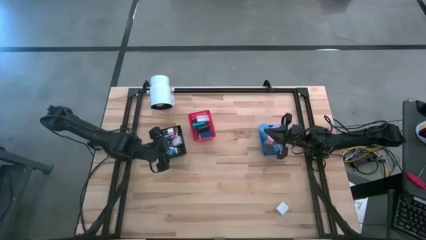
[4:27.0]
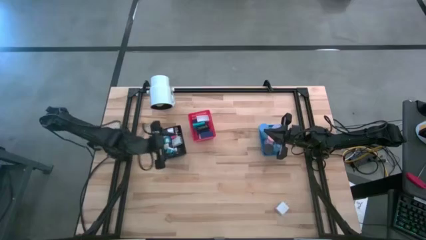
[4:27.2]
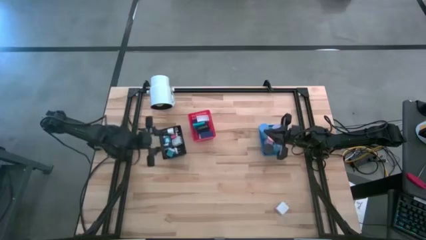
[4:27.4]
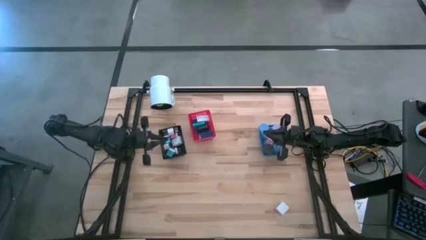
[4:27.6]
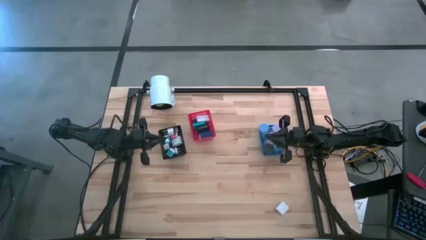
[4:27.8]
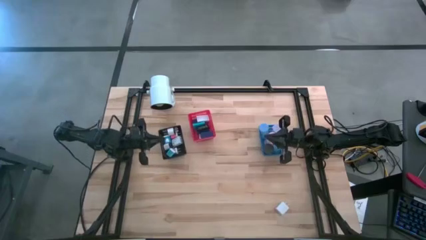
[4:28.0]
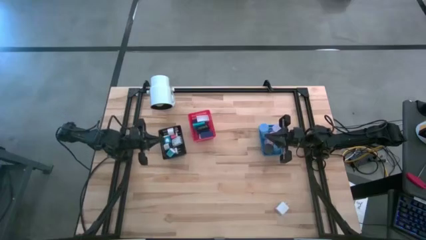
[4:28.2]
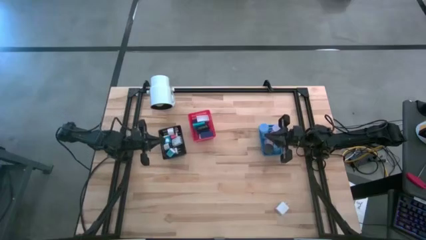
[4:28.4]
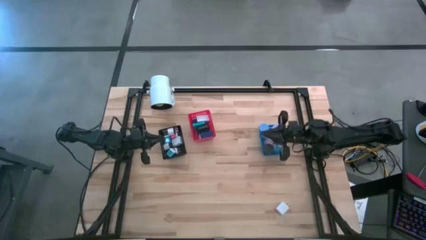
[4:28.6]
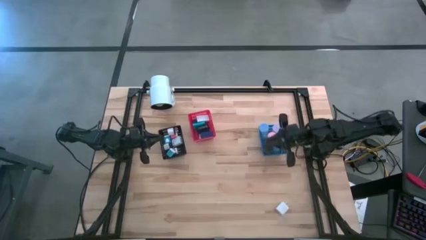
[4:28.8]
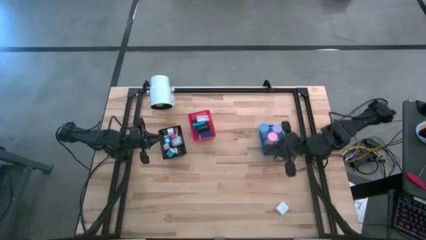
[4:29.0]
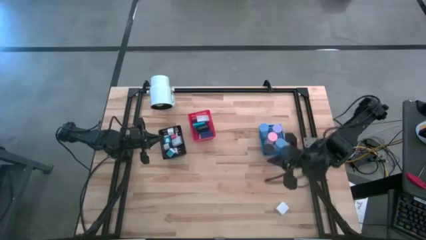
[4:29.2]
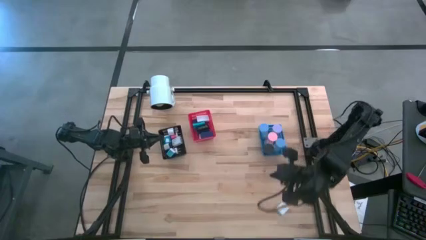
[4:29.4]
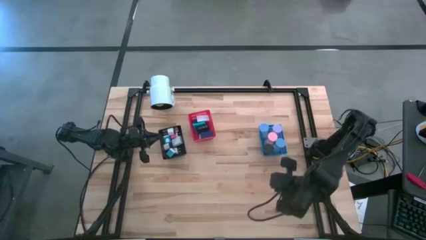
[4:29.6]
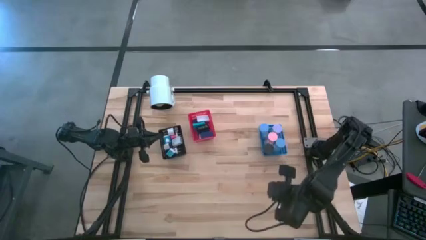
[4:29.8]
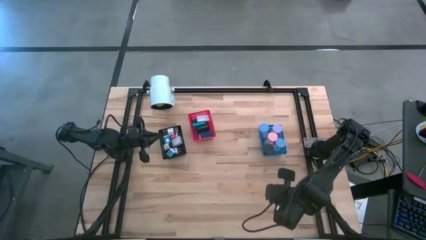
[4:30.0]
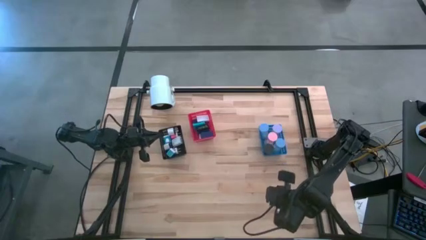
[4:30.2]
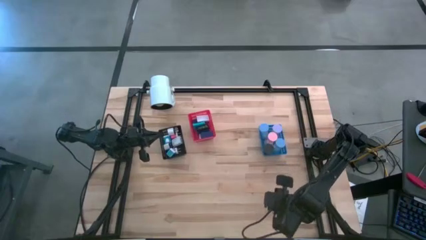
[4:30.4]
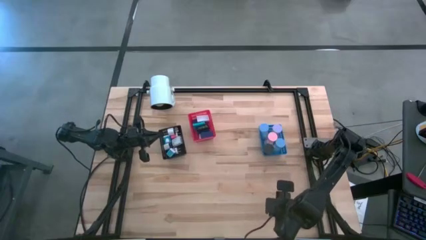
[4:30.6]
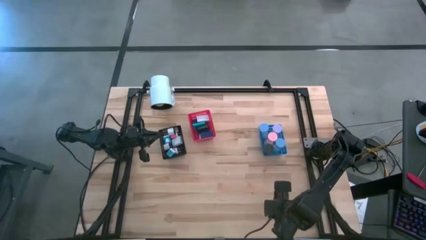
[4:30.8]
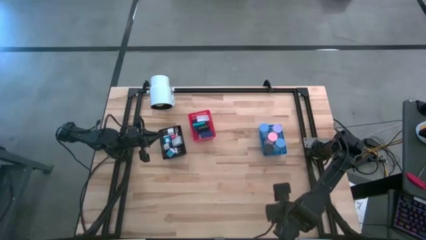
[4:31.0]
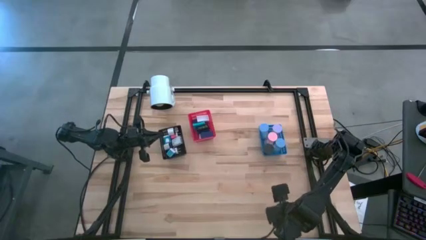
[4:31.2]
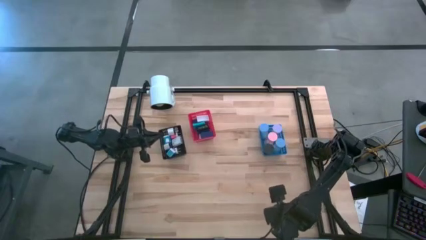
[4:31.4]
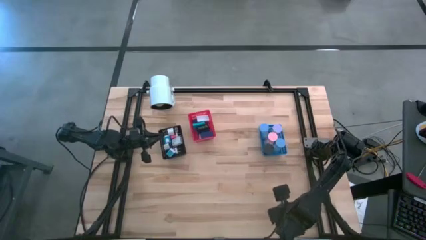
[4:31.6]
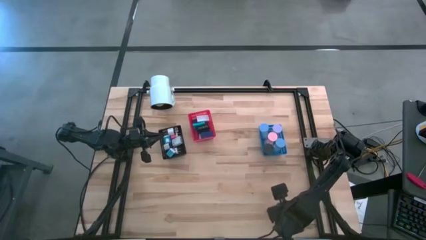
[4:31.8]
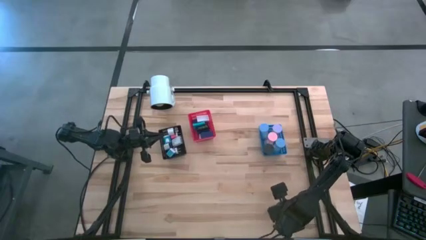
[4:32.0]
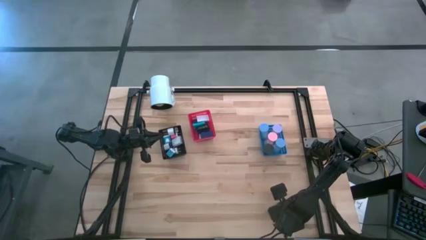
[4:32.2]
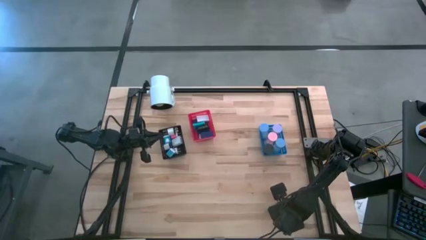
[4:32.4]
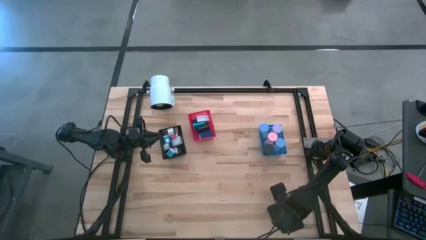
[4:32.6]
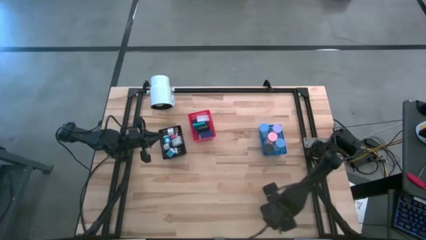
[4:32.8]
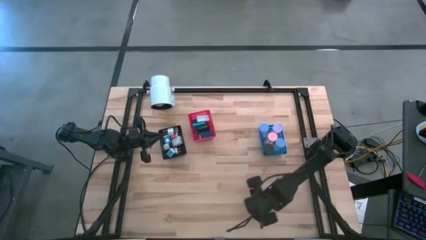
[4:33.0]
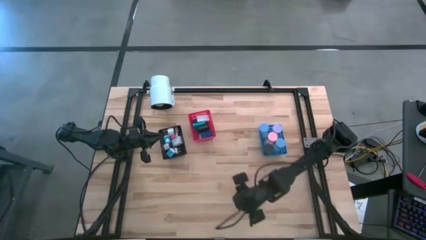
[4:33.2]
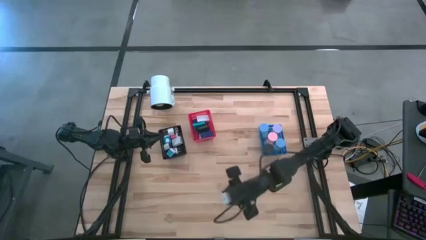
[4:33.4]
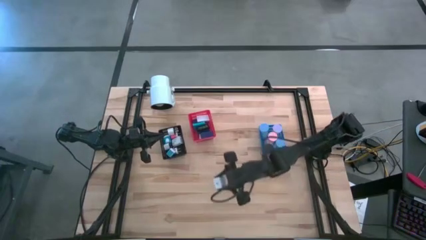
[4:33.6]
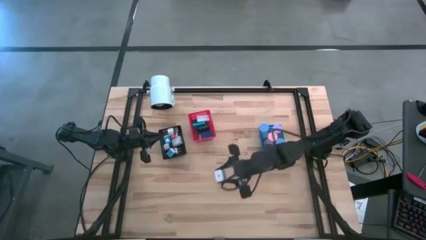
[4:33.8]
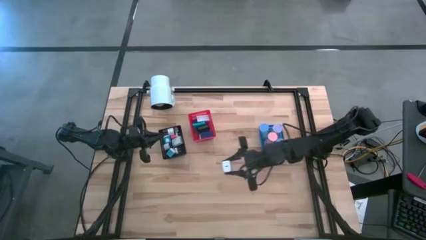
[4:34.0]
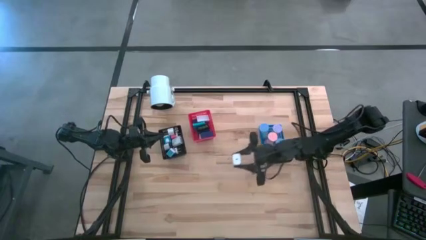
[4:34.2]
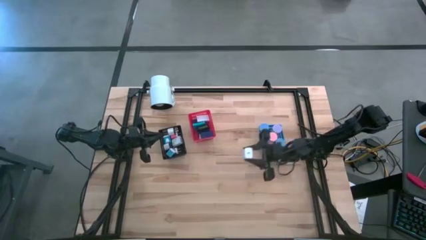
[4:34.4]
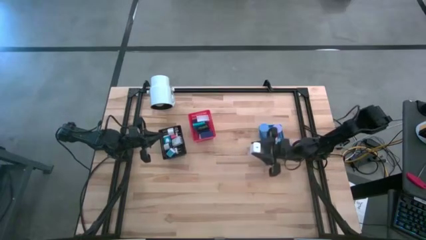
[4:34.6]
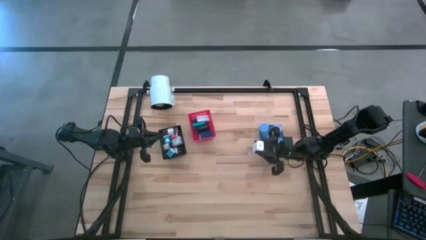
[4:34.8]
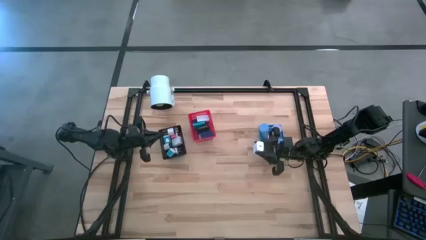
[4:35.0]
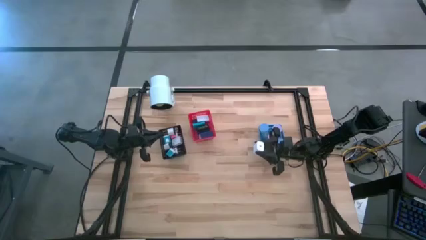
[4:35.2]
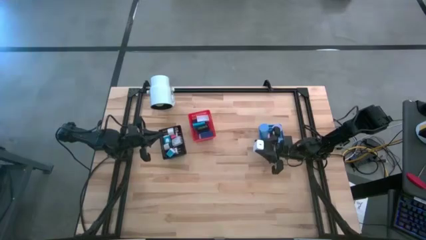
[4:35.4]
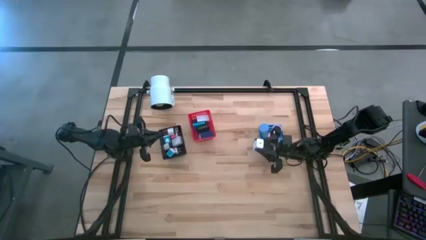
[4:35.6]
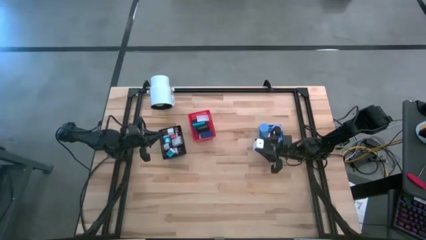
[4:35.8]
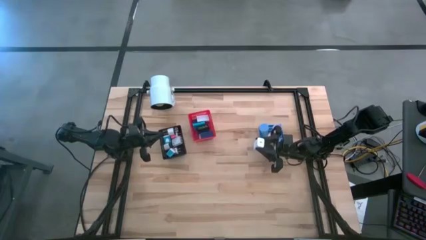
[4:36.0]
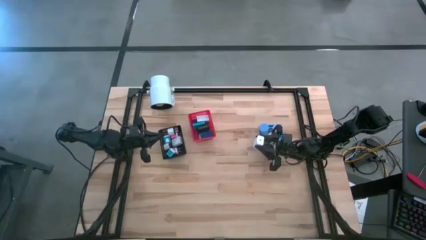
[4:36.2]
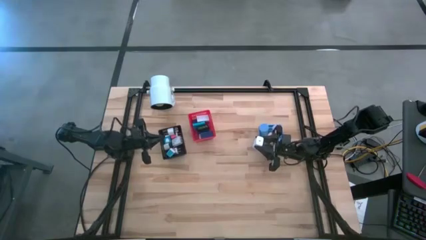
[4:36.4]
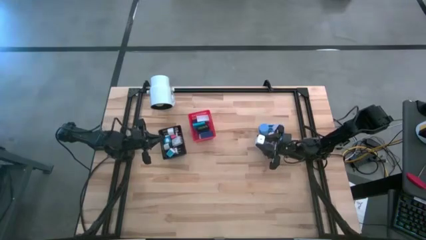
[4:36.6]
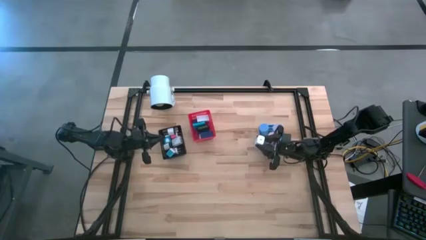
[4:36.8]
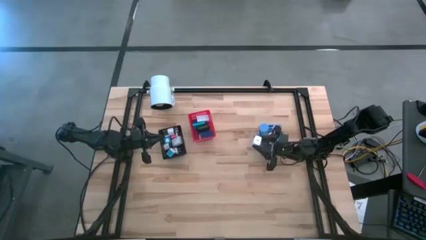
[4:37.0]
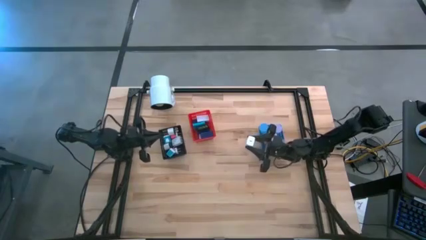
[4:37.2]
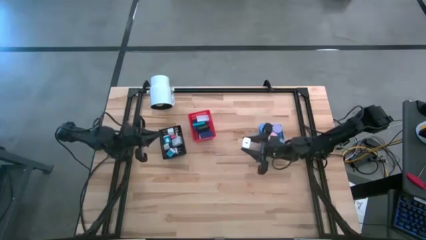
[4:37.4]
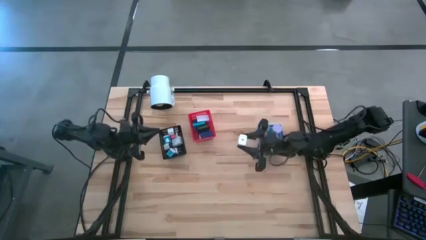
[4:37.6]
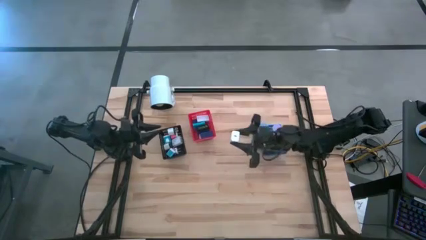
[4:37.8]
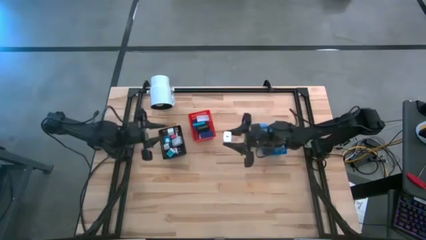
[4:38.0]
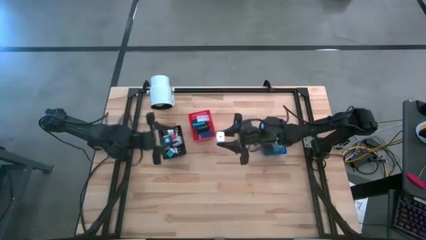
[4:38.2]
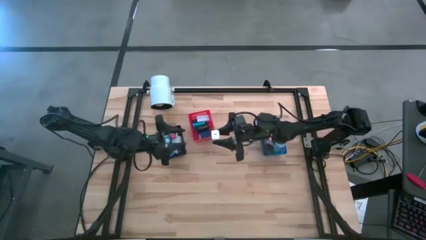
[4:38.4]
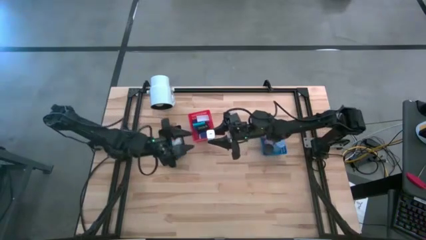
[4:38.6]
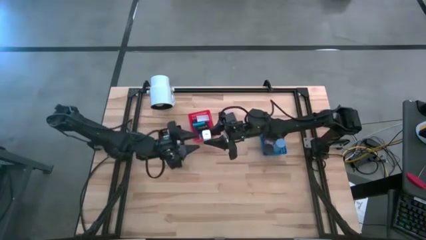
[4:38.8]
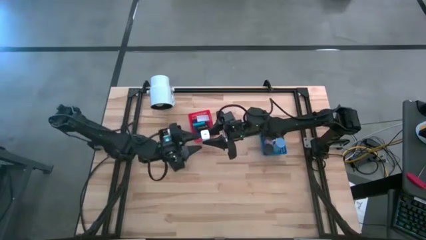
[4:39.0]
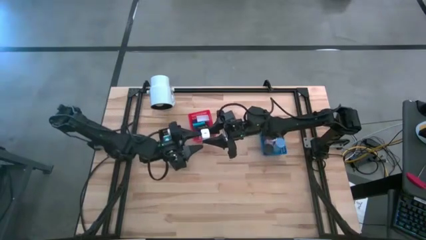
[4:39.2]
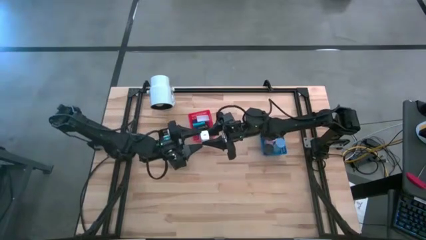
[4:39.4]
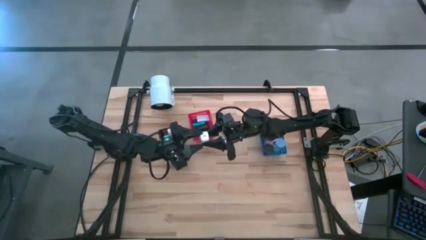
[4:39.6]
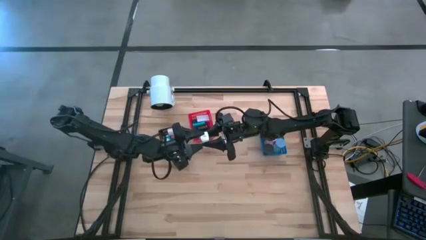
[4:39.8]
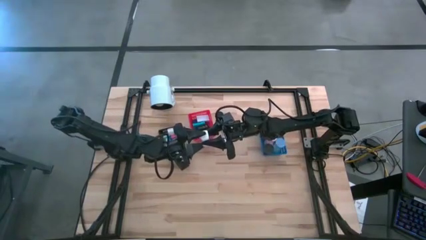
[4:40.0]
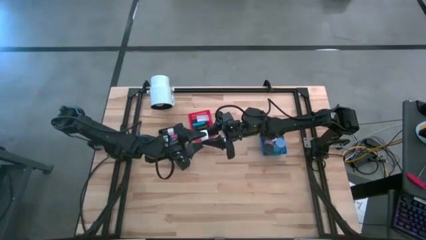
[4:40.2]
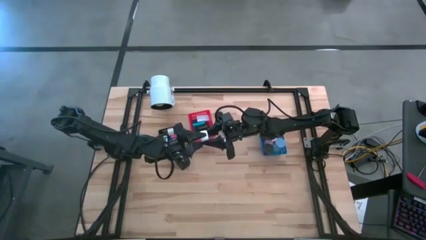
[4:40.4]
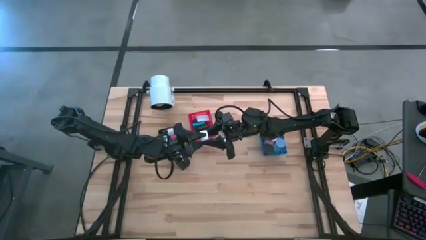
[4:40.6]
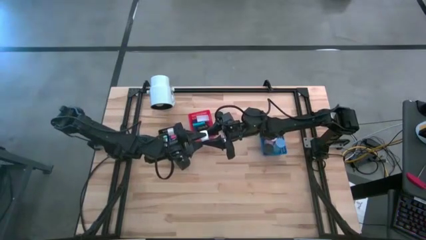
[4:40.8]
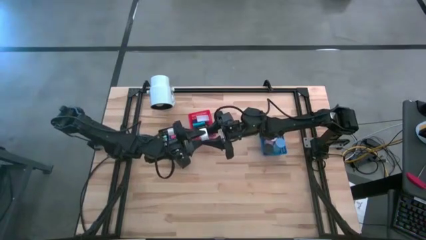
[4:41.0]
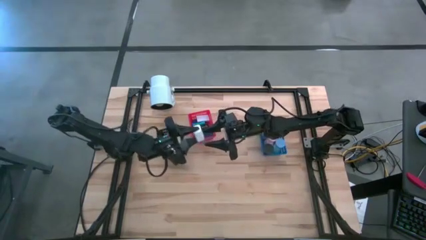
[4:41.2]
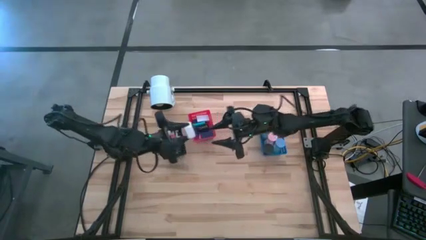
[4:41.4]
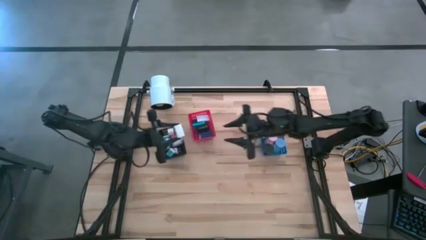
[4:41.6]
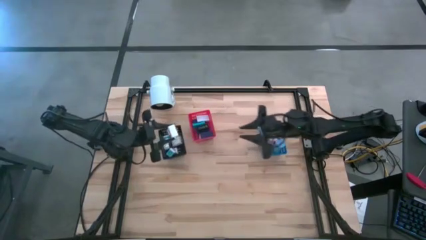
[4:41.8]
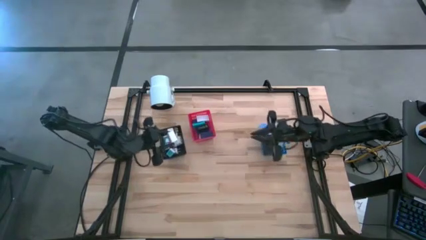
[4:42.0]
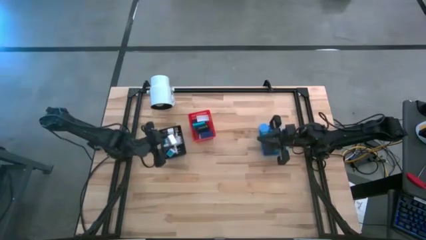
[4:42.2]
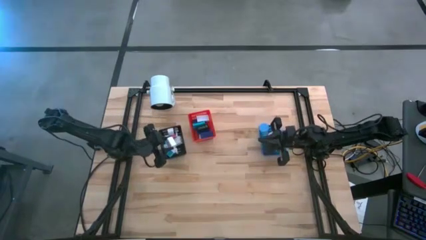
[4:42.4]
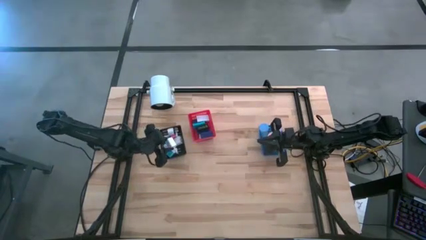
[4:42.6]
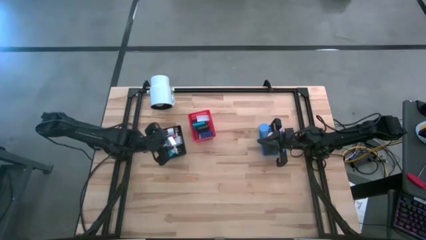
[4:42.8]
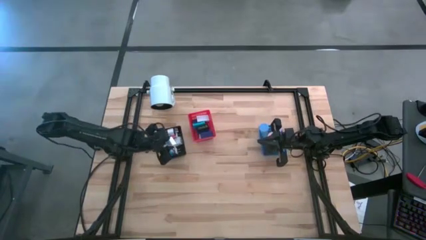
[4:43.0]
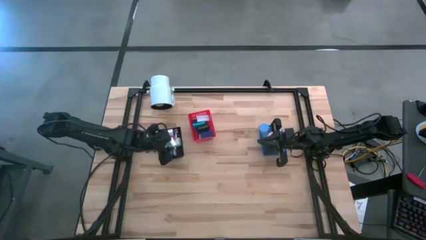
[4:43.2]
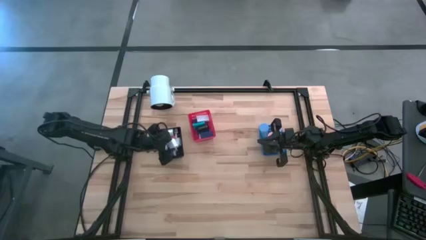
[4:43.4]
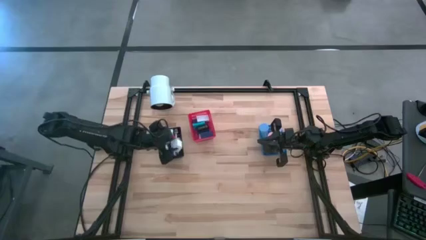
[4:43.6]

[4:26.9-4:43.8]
Task: Pick & Place Office items
Put the white charger adapter into the black bin
